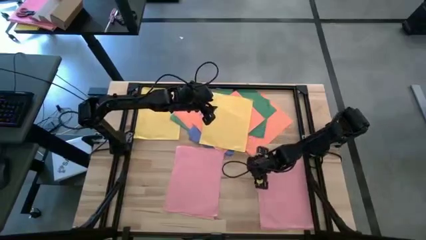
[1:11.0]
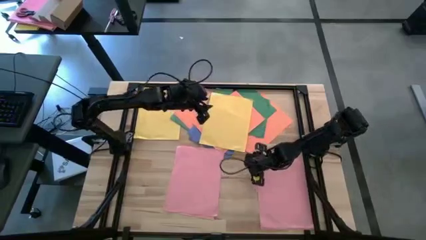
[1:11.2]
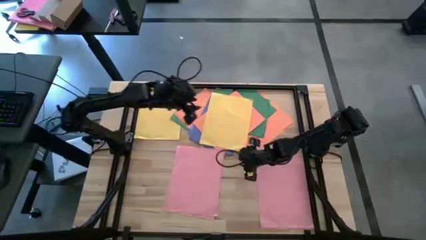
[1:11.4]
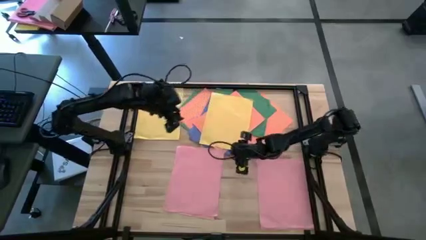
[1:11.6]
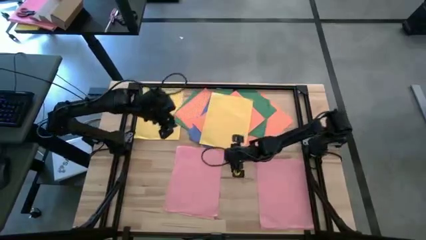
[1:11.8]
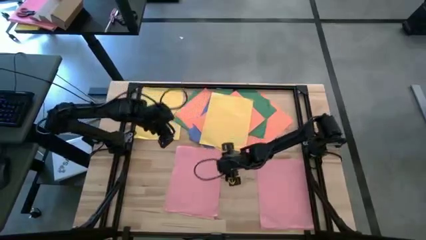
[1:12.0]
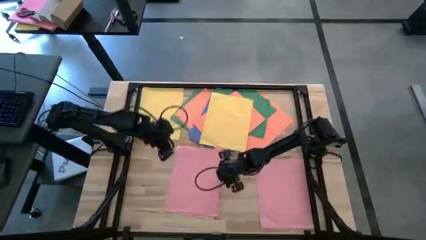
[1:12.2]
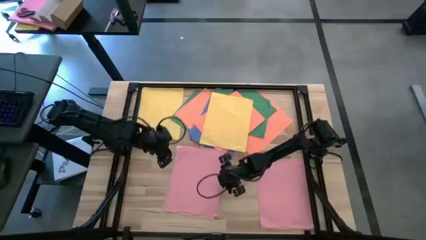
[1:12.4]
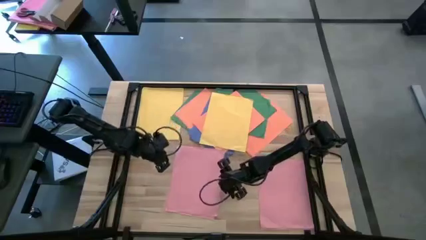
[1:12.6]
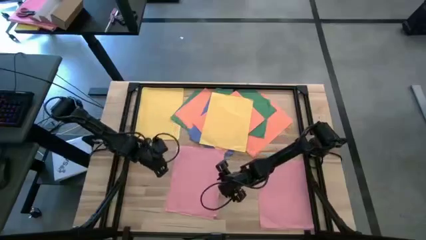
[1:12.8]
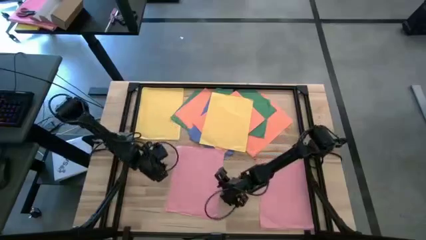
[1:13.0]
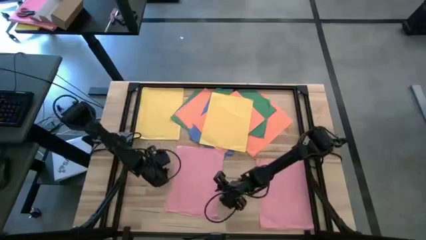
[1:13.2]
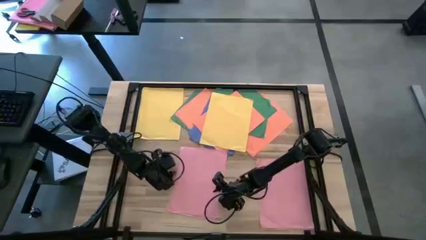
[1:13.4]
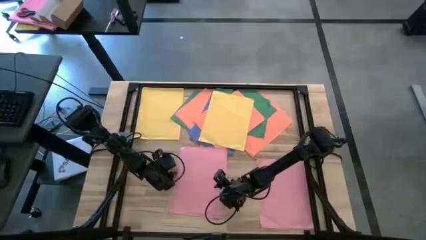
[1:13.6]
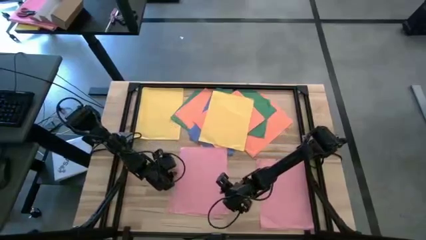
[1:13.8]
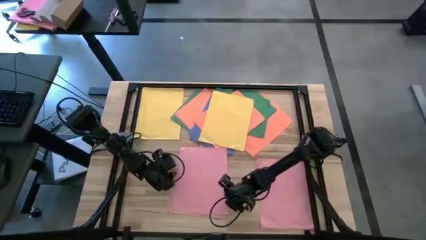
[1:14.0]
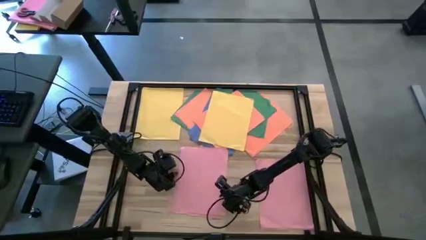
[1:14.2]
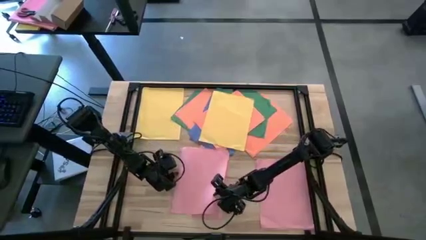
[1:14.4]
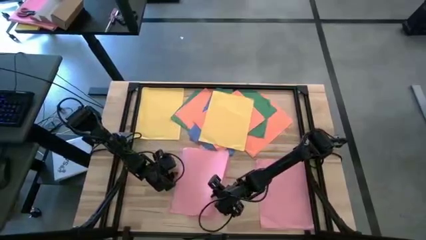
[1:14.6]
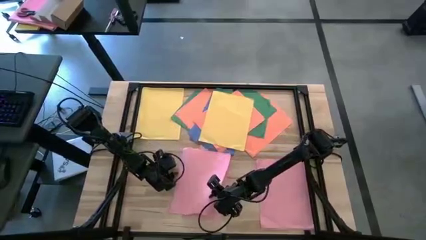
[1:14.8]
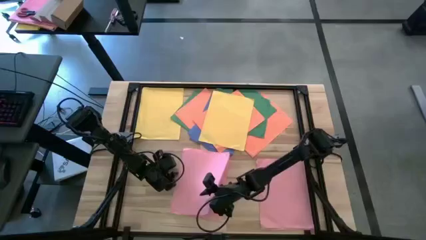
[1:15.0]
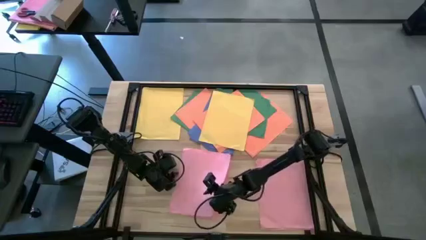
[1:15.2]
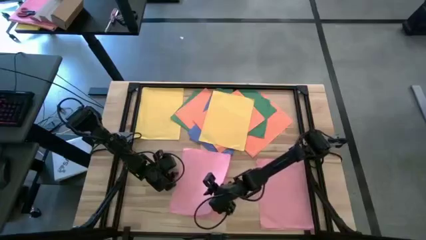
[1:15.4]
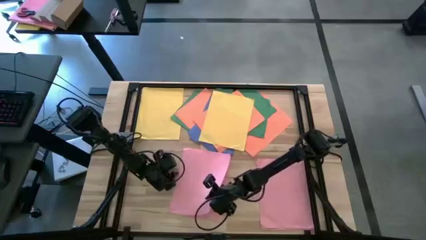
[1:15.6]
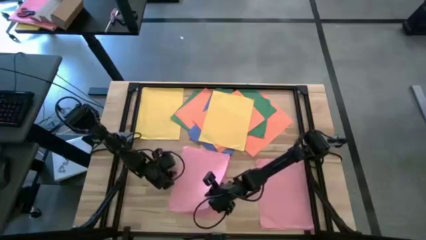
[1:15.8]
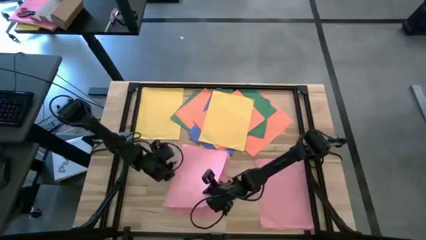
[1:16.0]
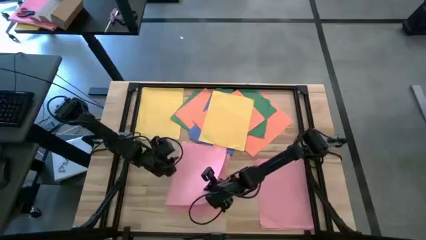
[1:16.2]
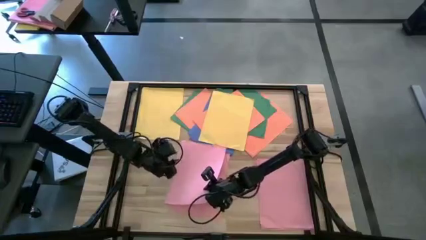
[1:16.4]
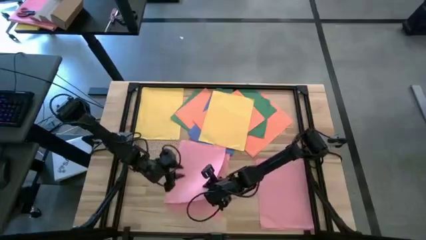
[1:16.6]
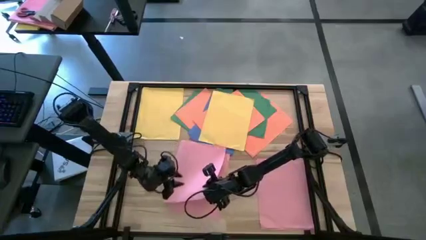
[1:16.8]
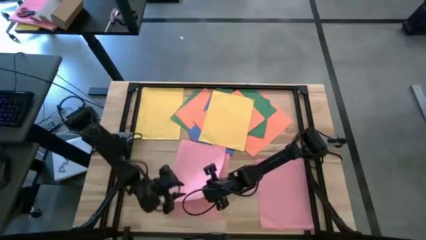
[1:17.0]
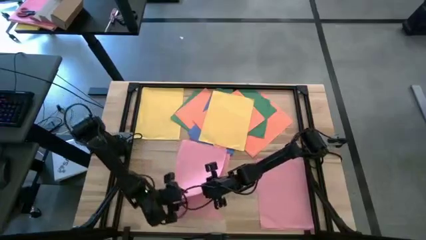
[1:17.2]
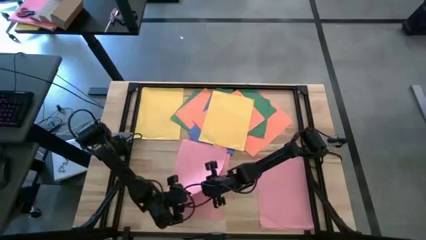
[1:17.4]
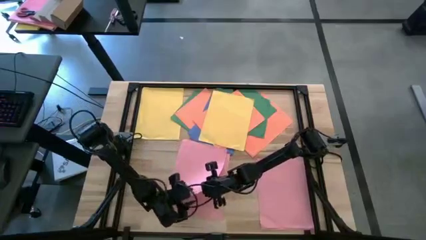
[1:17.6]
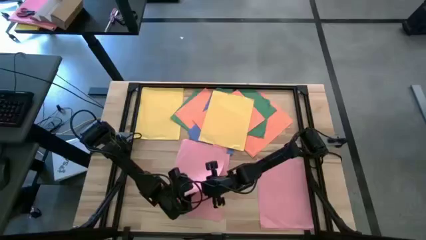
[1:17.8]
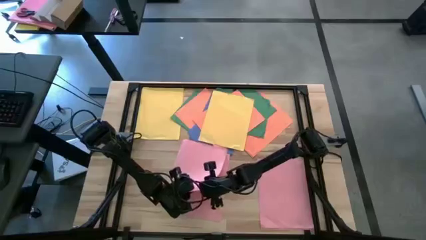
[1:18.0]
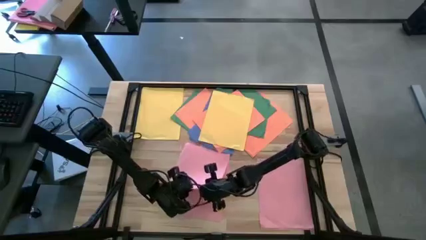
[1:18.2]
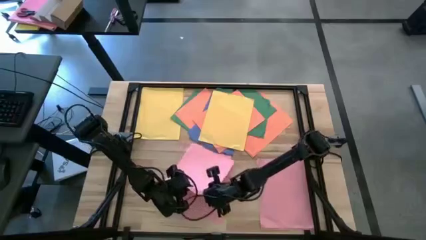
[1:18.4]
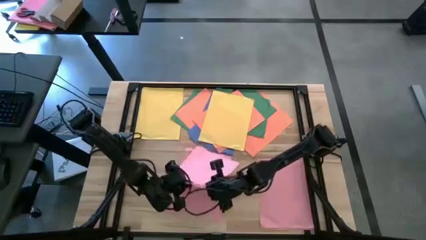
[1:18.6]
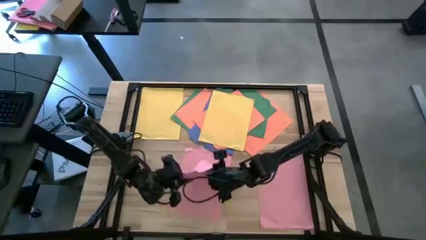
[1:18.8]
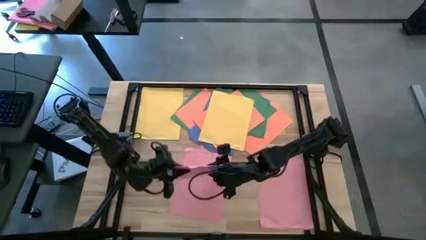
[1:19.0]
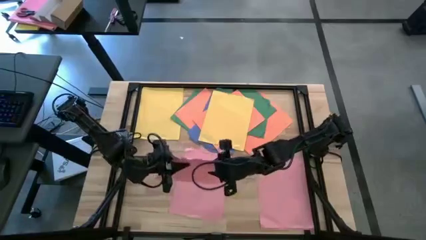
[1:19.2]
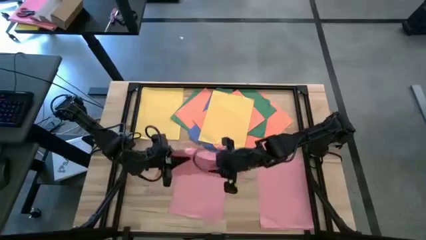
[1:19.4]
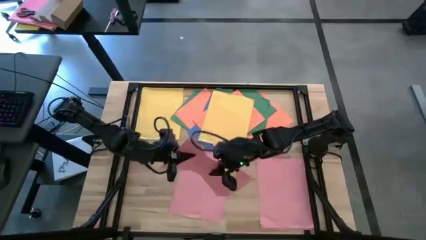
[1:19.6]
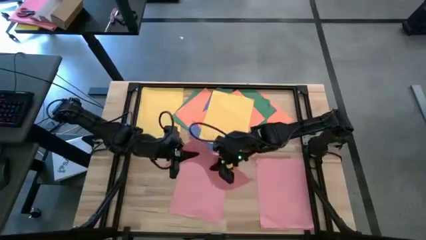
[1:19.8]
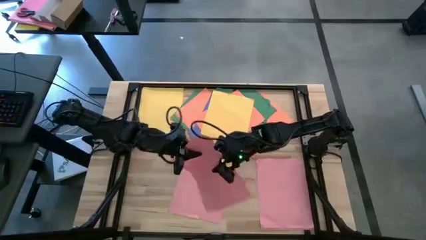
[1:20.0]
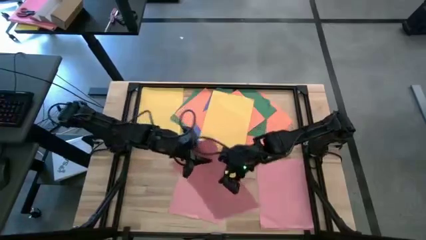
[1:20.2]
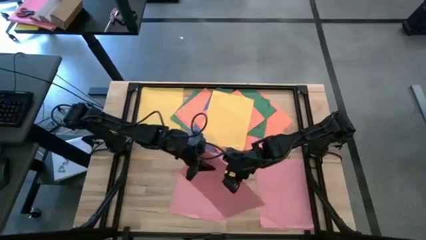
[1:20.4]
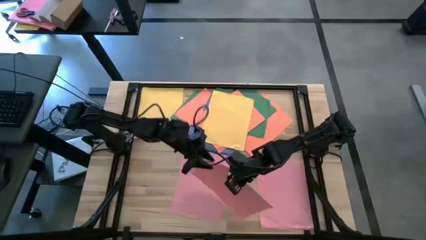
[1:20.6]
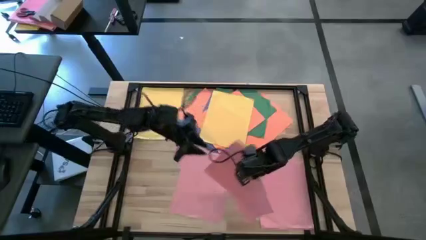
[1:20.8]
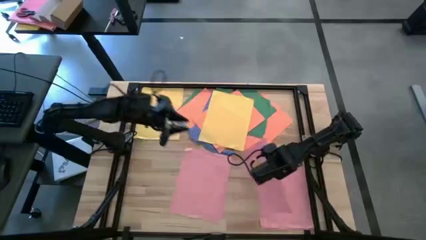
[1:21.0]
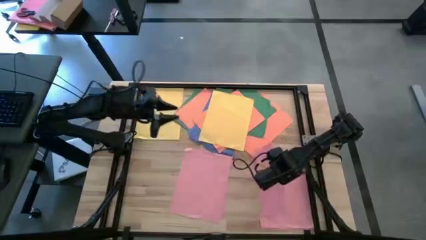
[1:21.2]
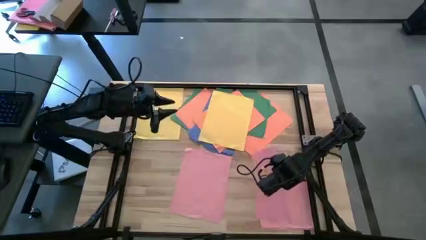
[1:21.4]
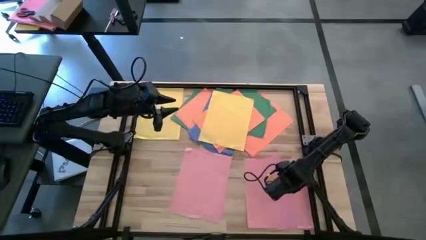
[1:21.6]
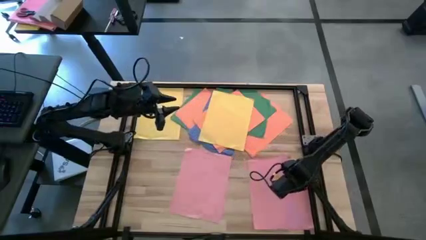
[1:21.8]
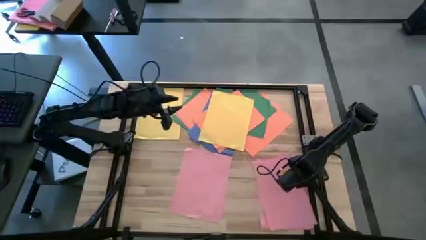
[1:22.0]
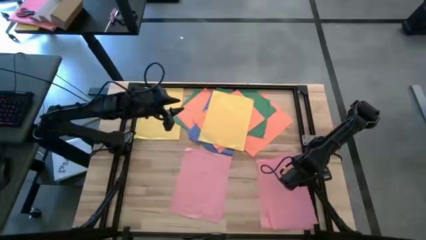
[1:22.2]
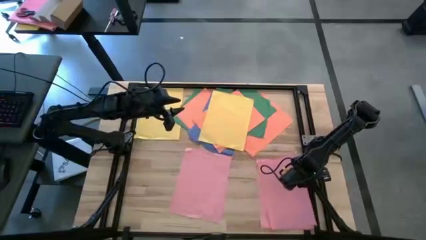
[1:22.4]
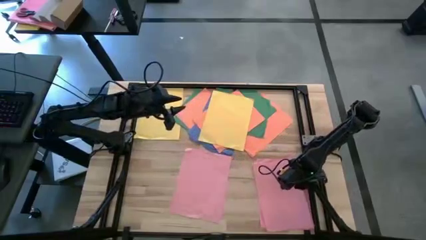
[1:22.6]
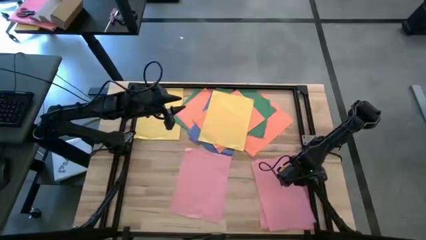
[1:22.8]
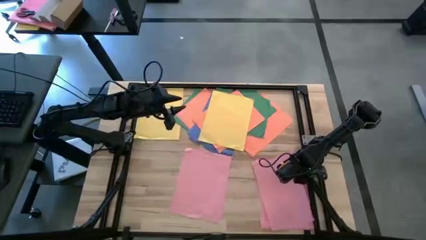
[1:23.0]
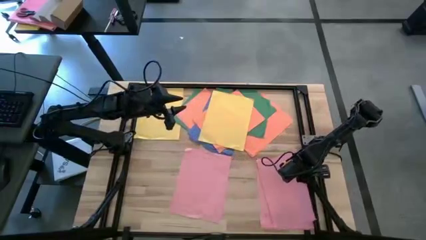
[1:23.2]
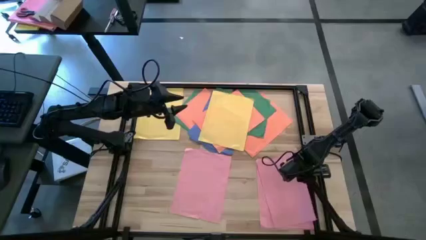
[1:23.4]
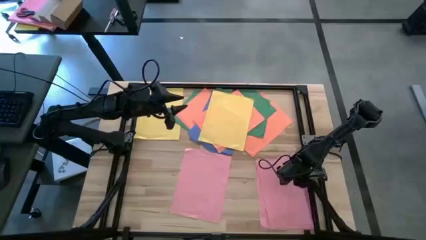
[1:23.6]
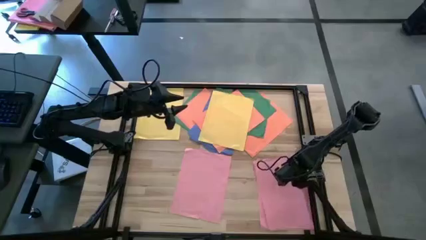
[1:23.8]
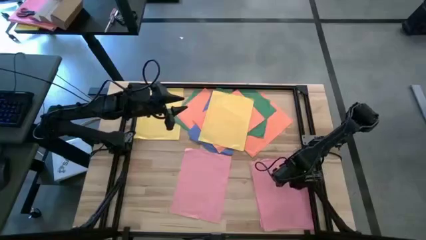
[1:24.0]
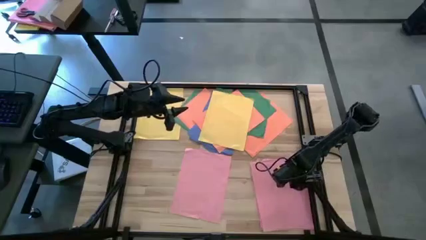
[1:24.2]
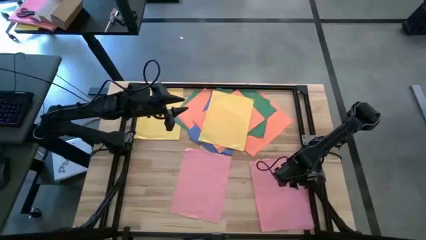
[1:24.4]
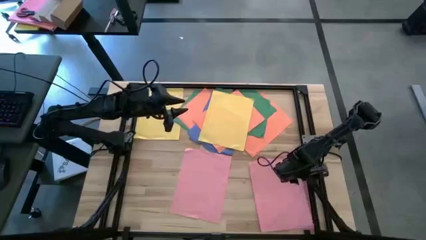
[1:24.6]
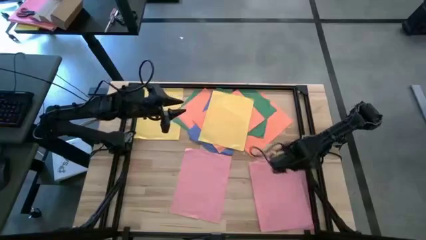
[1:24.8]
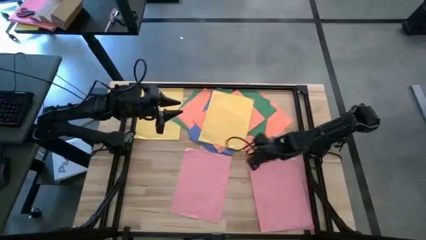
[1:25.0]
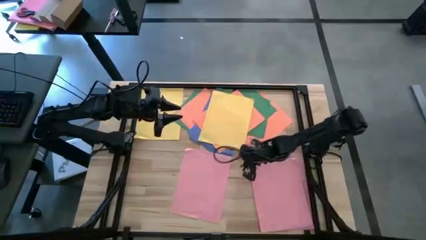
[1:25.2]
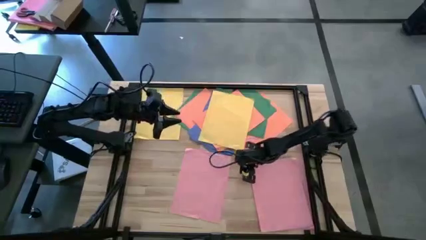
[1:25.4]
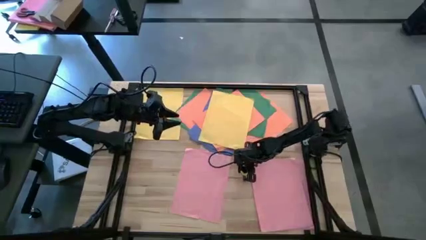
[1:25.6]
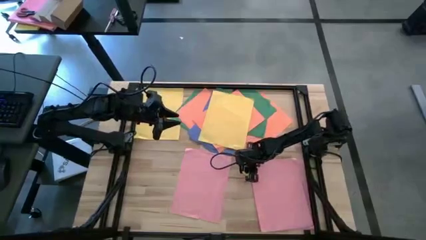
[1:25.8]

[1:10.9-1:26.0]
Task: Organize paper
Stack the pink paper on top of the stacked pink papers

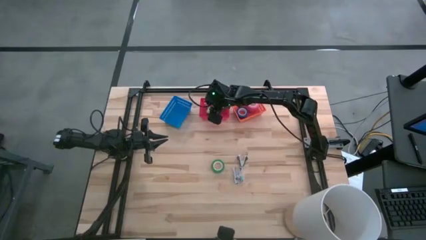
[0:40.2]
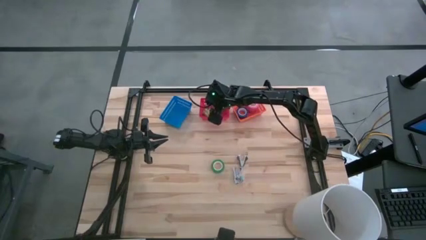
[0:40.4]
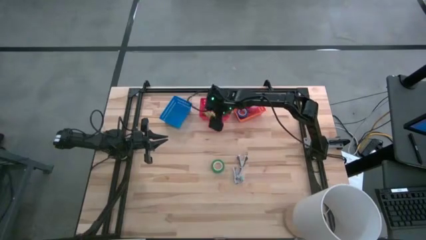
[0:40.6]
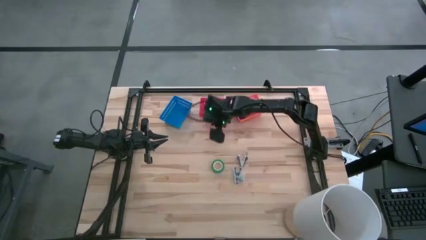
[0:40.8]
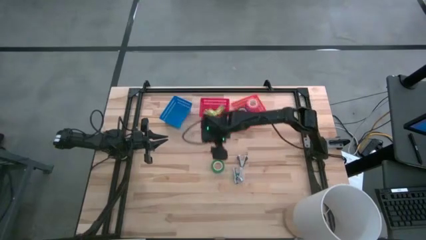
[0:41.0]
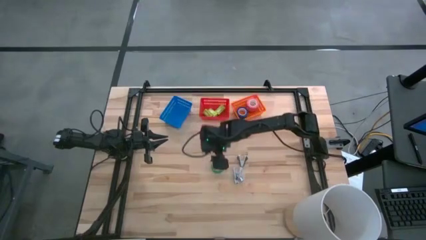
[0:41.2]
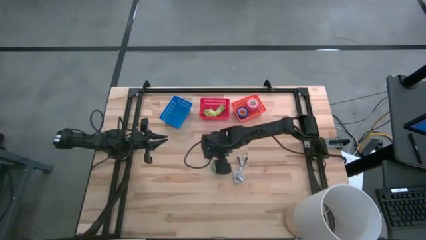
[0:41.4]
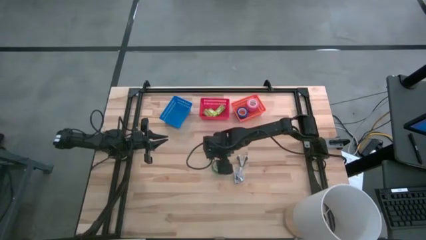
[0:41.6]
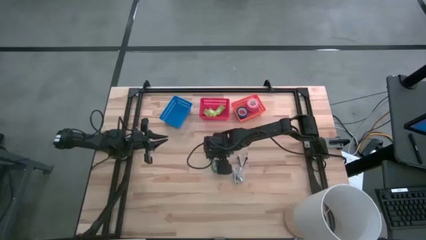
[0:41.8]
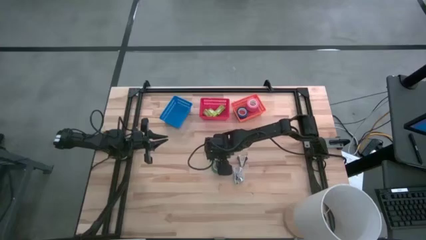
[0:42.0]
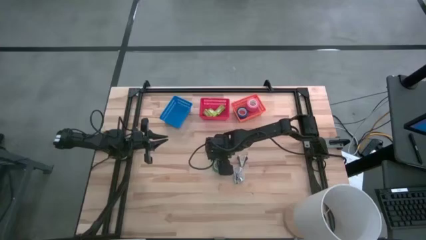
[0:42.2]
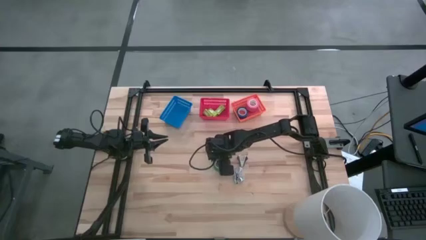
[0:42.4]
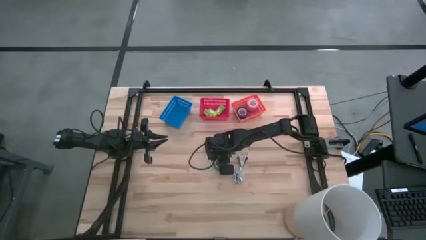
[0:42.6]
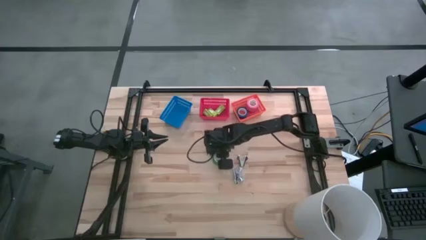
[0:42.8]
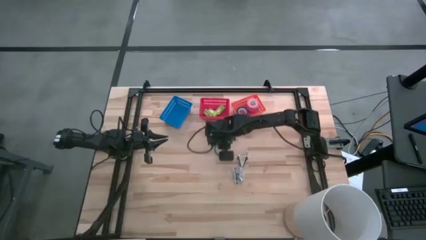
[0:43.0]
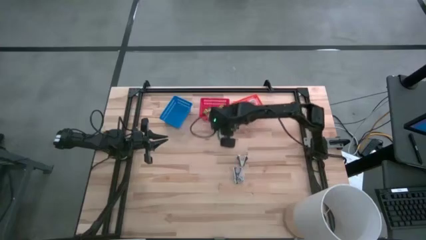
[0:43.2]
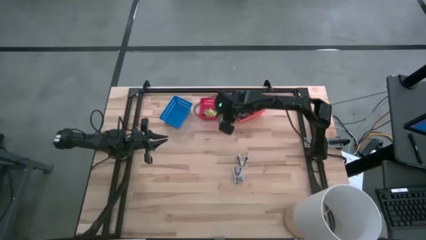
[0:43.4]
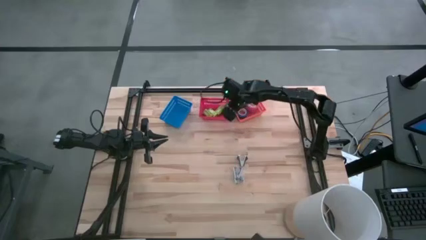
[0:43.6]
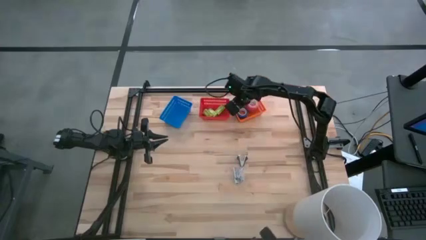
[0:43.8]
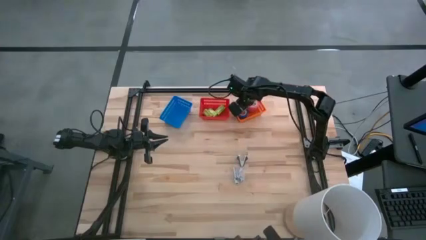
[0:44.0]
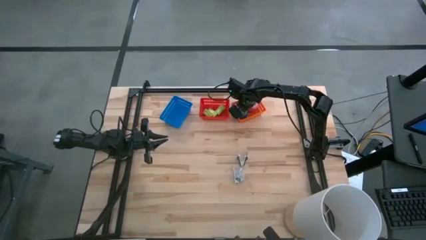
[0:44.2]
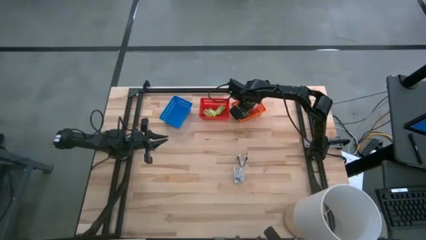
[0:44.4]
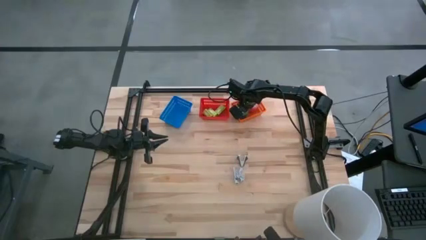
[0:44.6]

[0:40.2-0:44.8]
Task: Pick and place Stapler, Stapler remover, tape
Put the green tape into the orange bin
